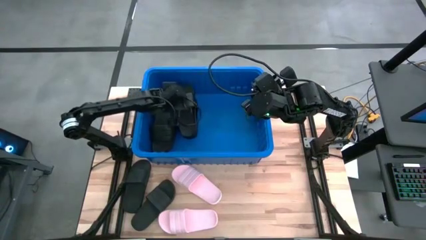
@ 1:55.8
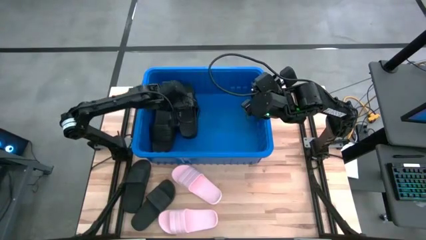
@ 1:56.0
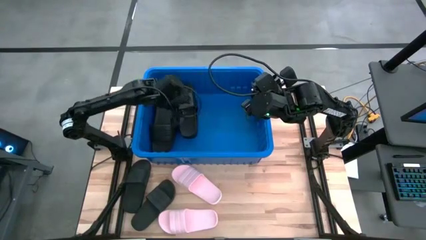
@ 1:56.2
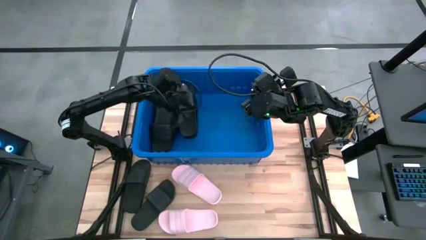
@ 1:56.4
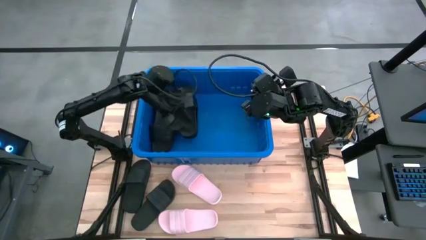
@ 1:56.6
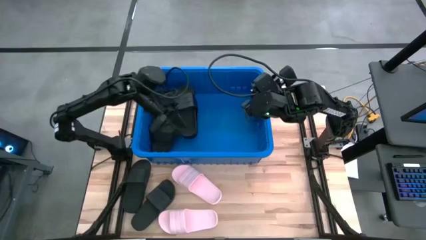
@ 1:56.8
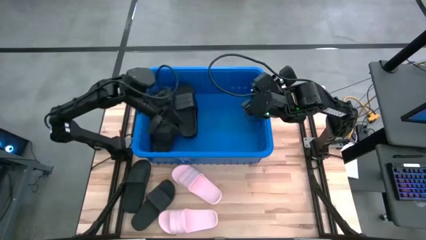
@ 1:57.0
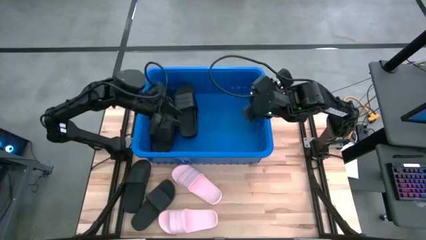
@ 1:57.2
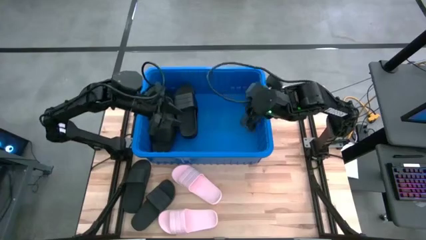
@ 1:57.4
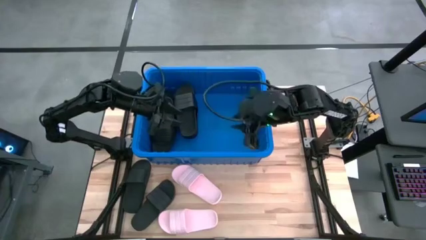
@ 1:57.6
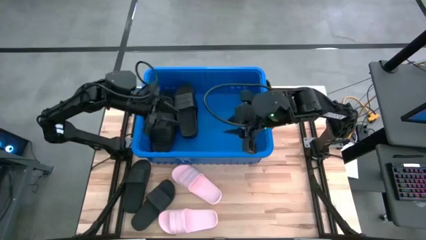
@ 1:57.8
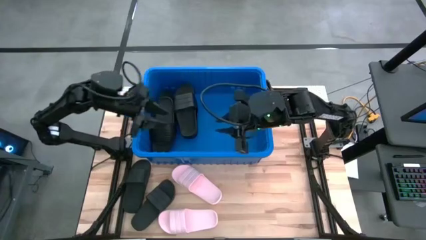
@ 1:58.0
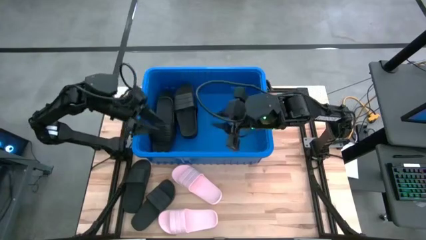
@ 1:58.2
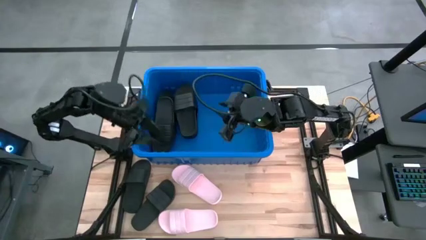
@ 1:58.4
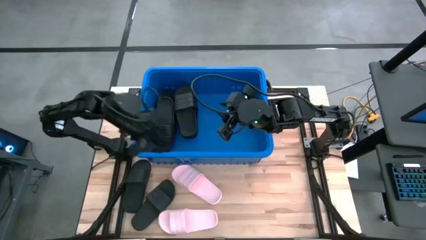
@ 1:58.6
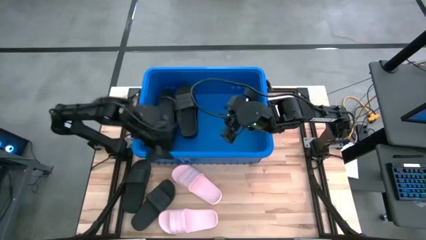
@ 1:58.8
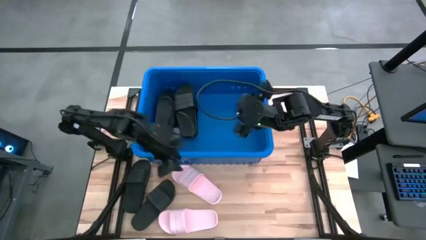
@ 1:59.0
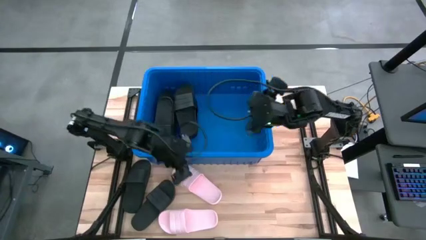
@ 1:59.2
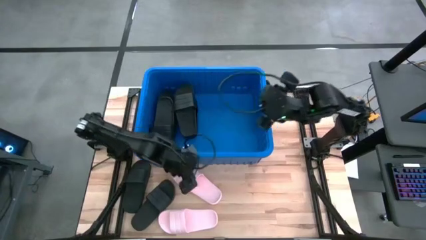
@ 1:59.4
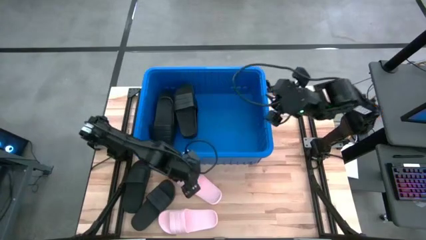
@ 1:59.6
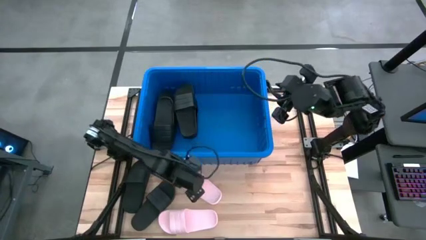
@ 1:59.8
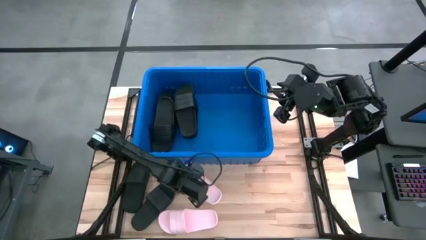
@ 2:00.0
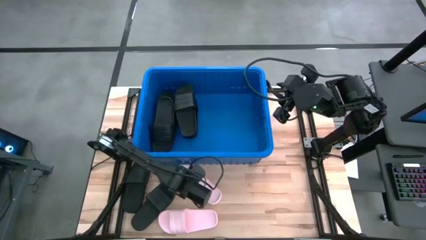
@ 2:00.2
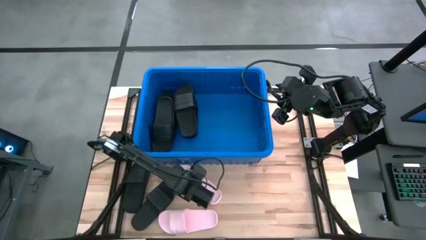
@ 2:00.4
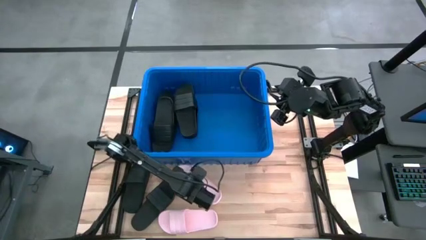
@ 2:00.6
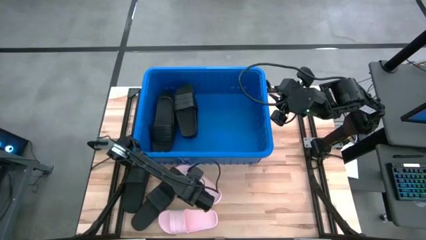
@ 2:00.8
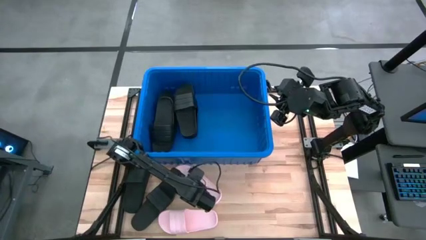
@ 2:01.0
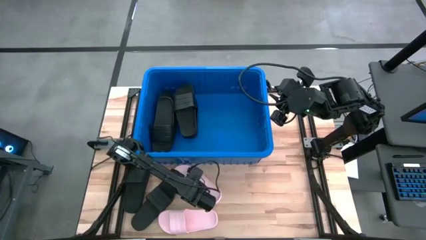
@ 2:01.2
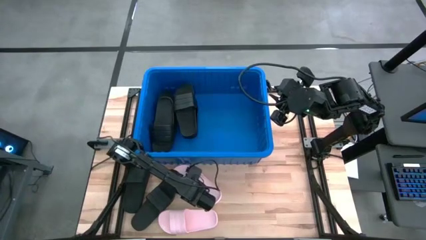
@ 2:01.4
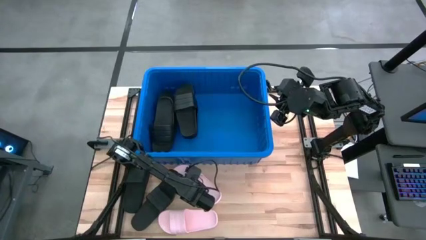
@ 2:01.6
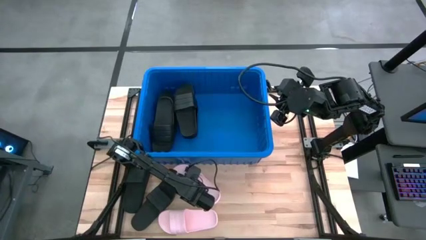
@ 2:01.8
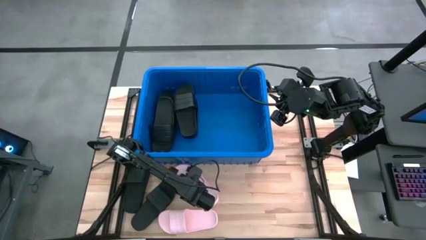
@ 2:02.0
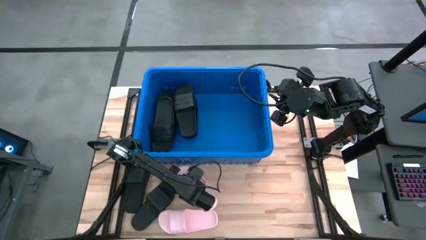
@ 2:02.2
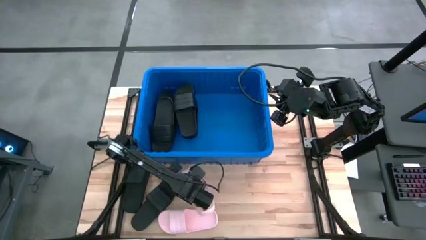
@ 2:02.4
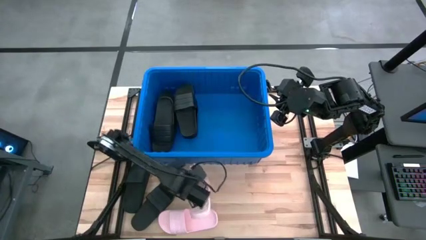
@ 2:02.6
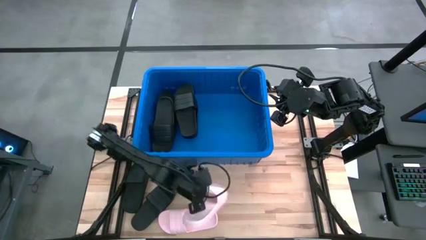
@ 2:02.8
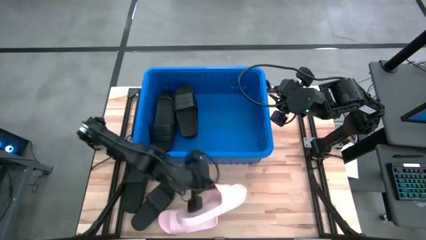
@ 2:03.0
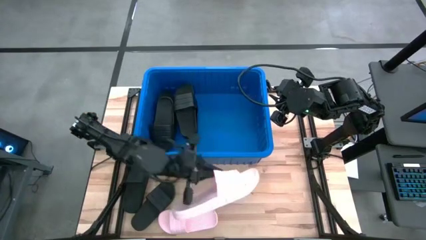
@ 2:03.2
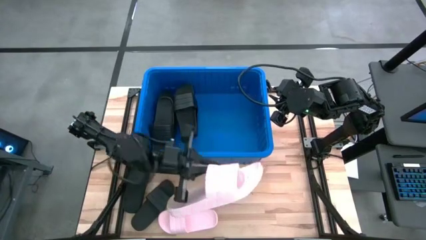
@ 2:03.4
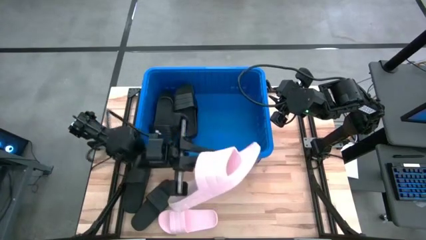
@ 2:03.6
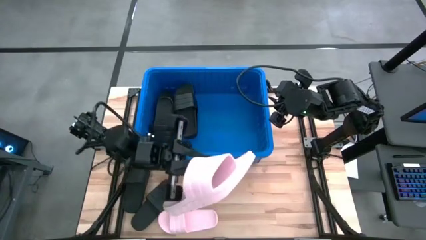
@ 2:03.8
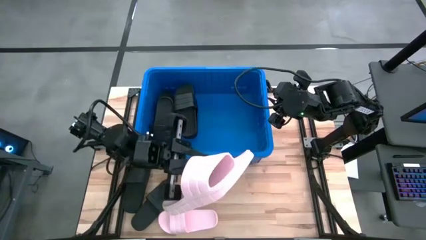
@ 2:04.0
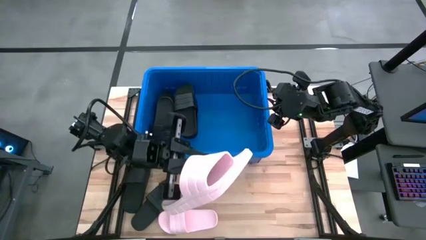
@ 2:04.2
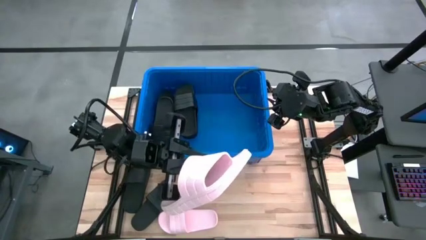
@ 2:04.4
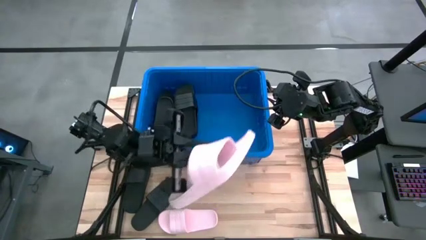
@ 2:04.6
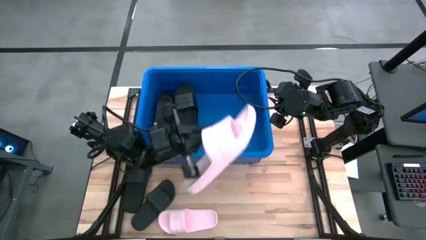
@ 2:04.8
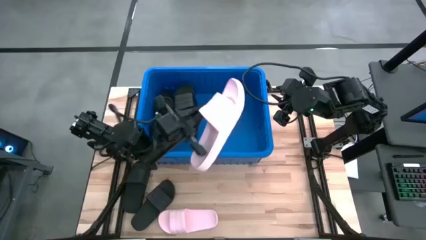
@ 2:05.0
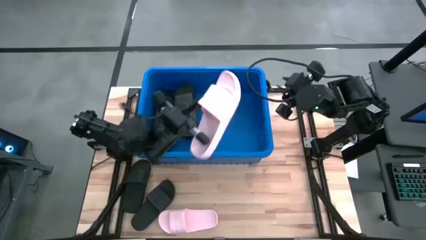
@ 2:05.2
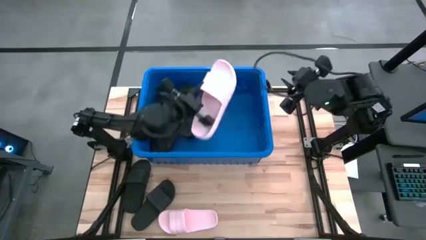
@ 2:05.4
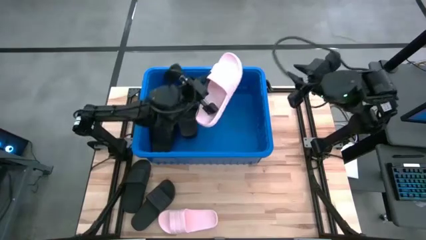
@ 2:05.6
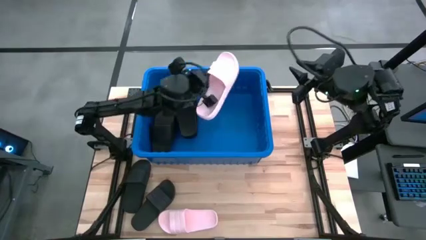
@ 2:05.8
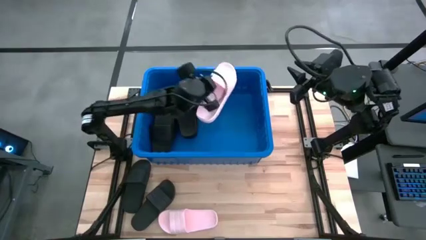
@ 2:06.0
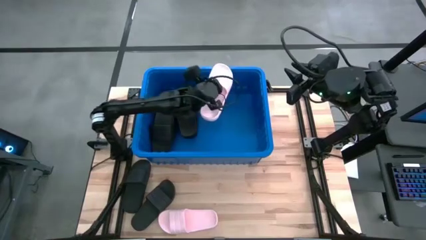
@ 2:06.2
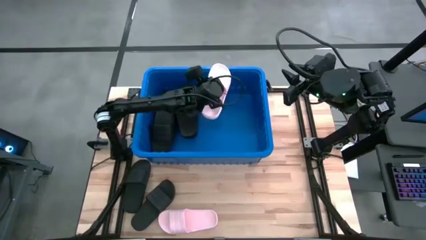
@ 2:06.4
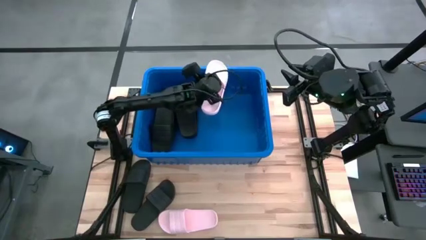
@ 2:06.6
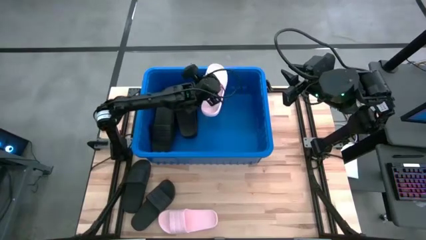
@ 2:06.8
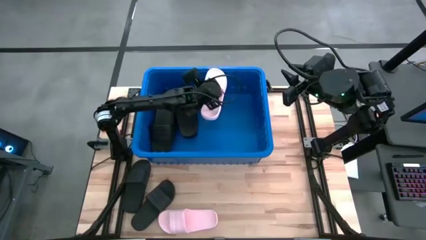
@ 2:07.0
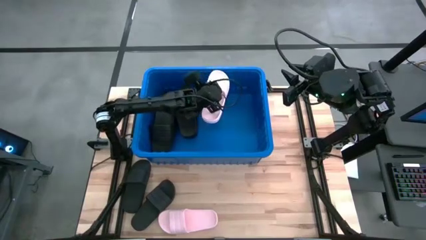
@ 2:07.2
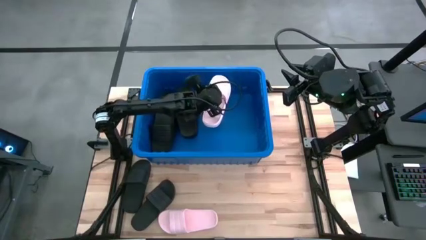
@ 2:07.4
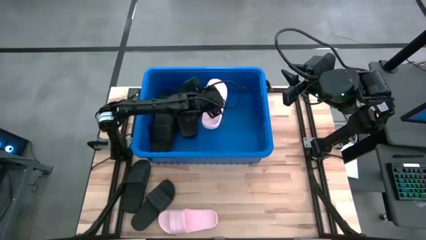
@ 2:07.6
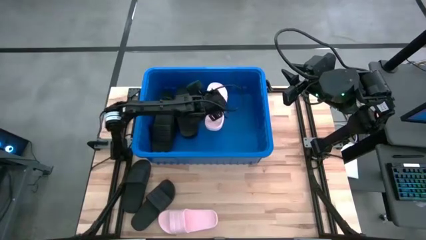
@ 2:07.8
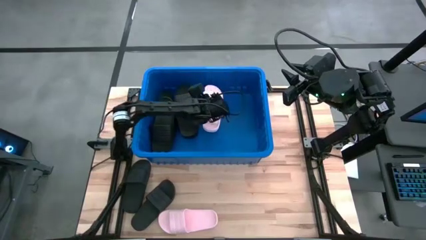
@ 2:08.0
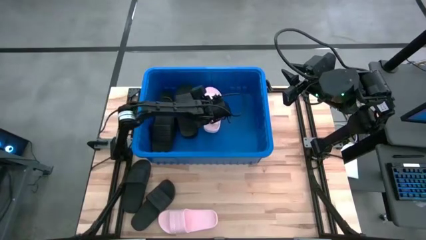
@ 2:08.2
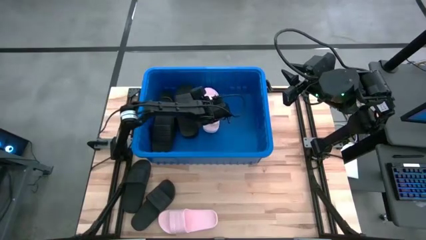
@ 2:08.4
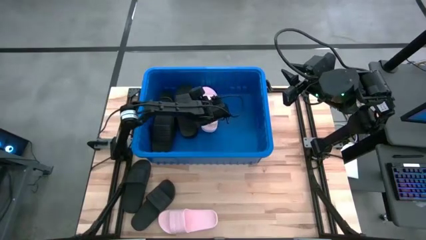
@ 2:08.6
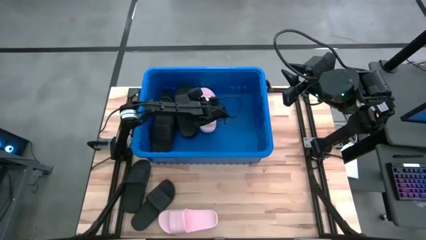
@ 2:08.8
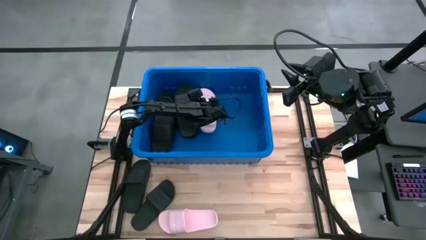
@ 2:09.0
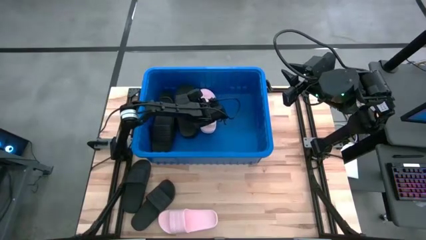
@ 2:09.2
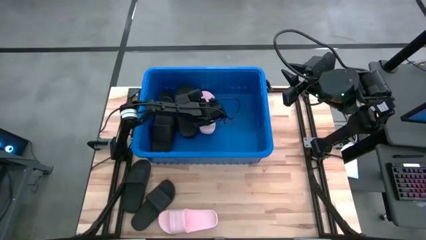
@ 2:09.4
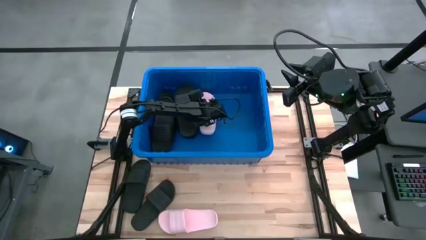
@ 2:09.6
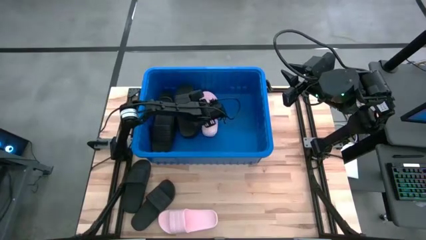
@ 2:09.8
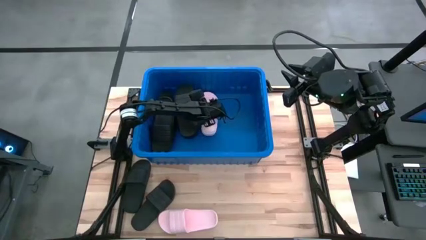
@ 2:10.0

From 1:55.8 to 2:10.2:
Task: Pick and place slides into bin
Put the top pink slide into the blue container

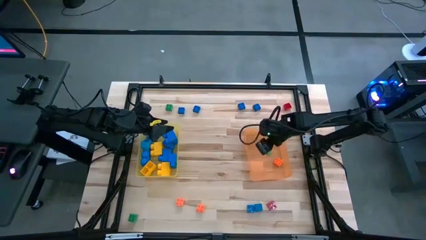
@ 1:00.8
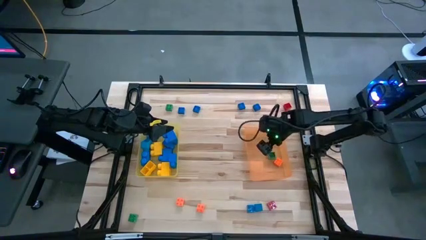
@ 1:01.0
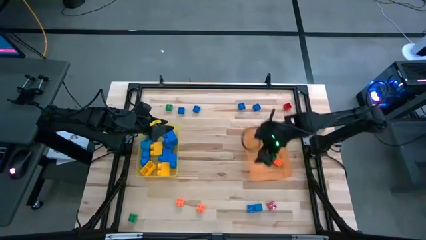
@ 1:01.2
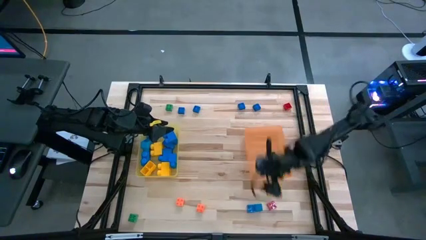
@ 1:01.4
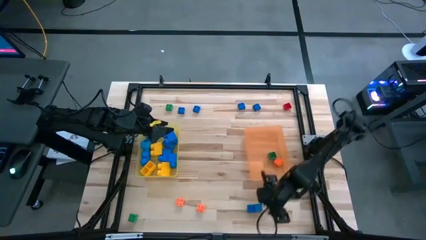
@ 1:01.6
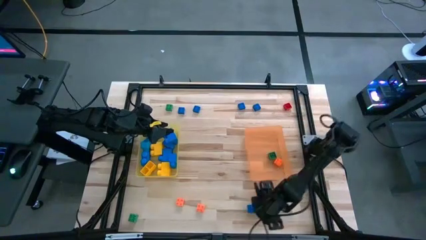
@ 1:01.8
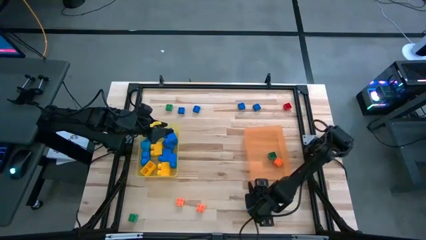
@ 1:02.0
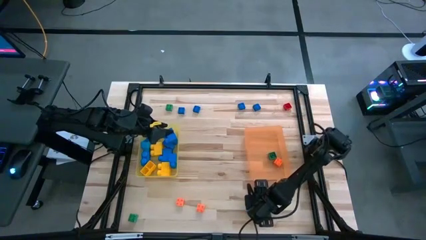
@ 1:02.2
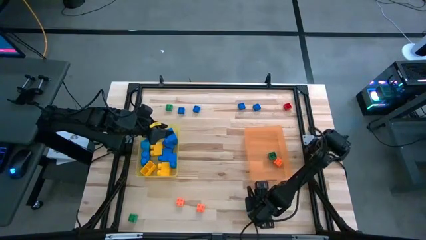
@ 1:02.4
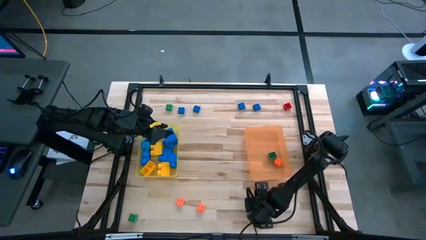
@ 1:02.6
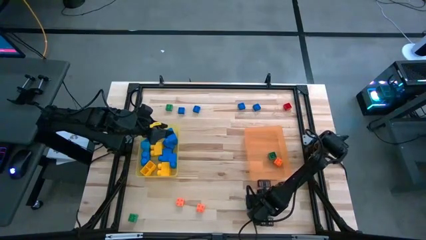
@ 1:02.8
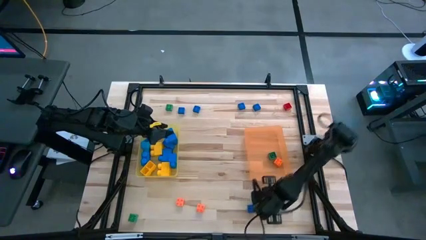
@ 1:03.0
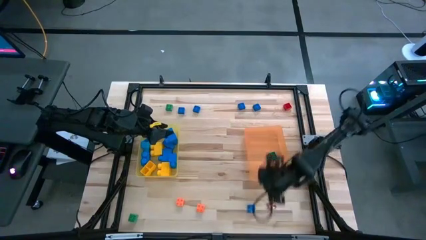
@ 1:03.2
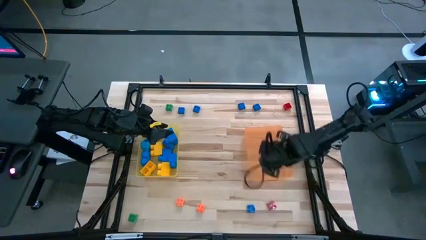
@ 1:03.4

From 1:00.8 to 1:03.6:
Task: Sort blocks by size
Put the small blue game piece into the orange bin
